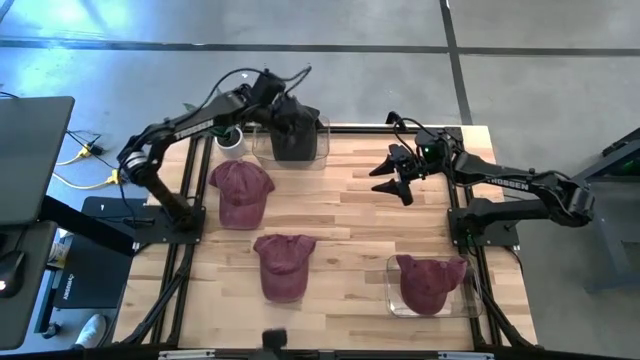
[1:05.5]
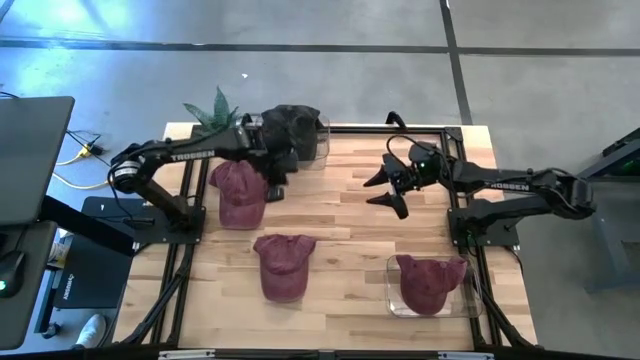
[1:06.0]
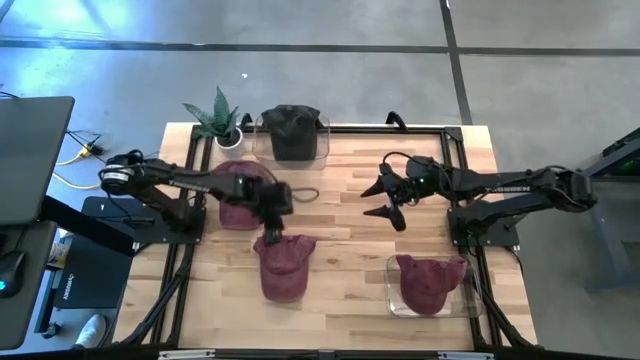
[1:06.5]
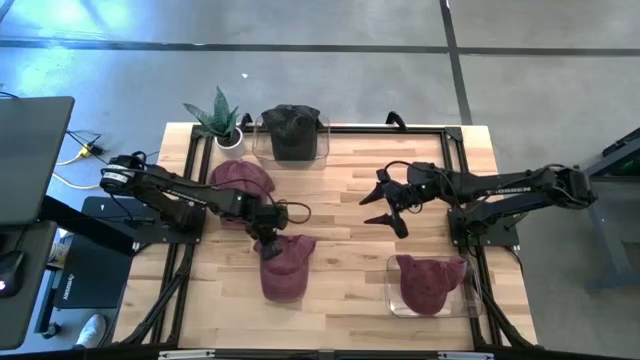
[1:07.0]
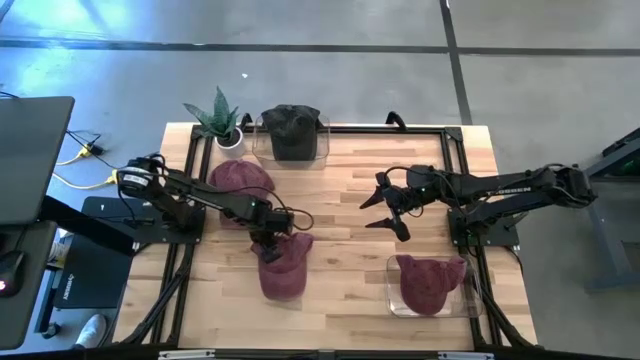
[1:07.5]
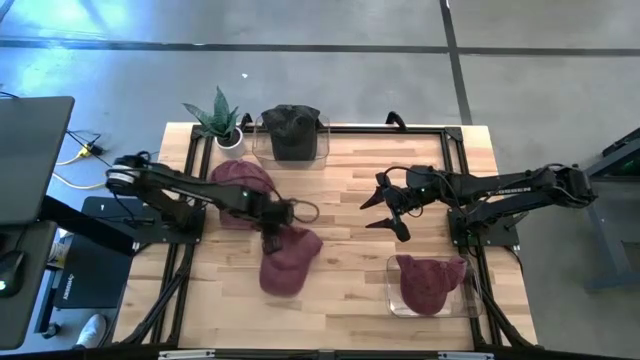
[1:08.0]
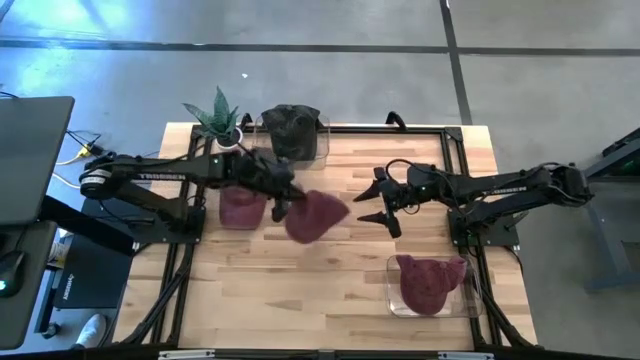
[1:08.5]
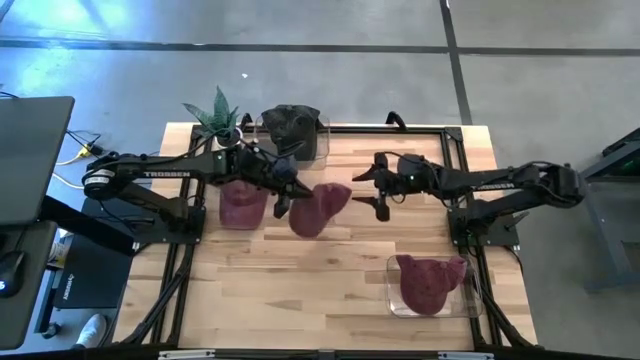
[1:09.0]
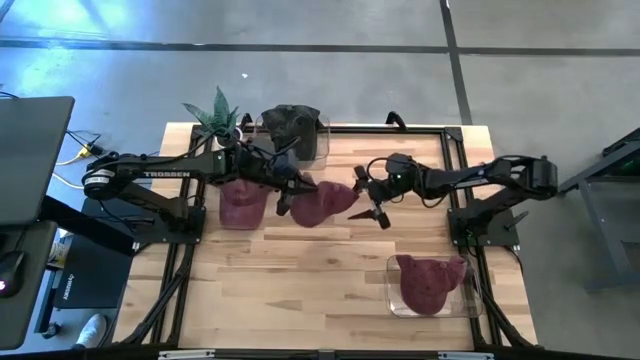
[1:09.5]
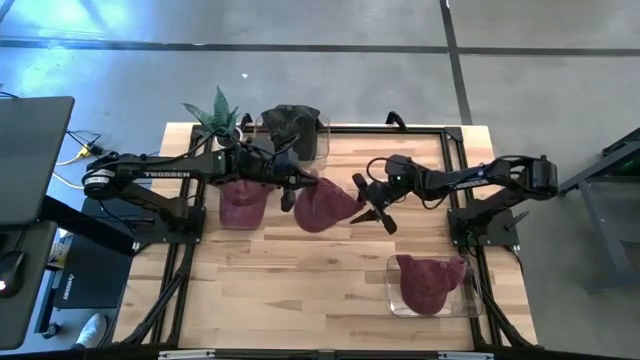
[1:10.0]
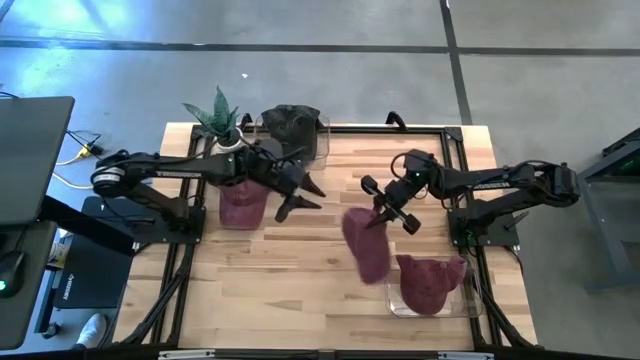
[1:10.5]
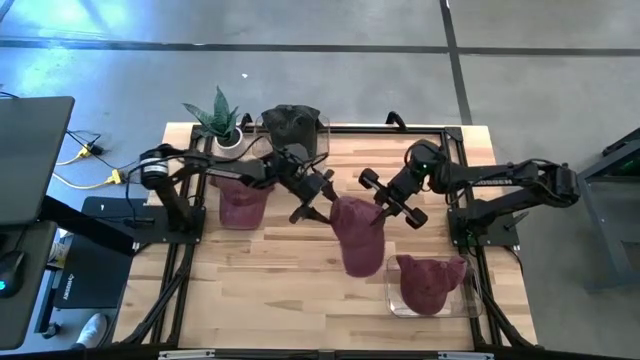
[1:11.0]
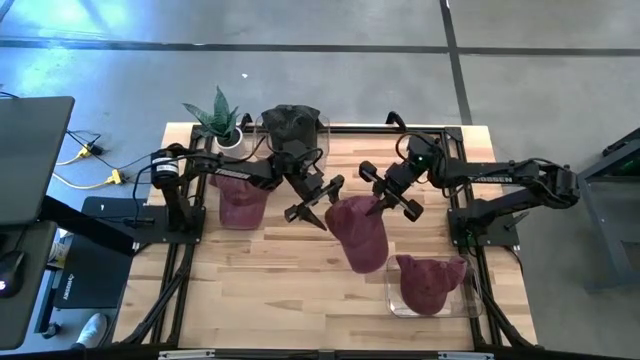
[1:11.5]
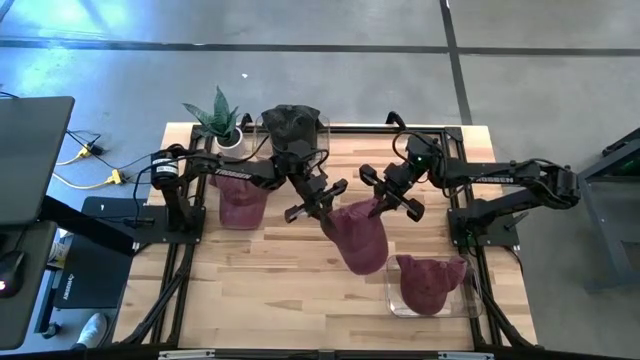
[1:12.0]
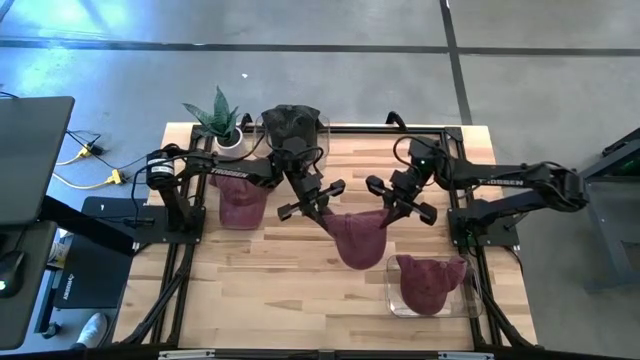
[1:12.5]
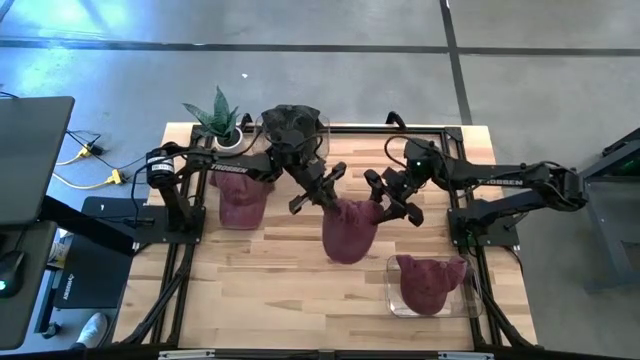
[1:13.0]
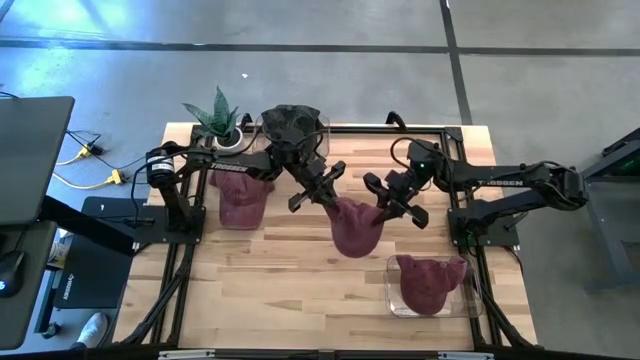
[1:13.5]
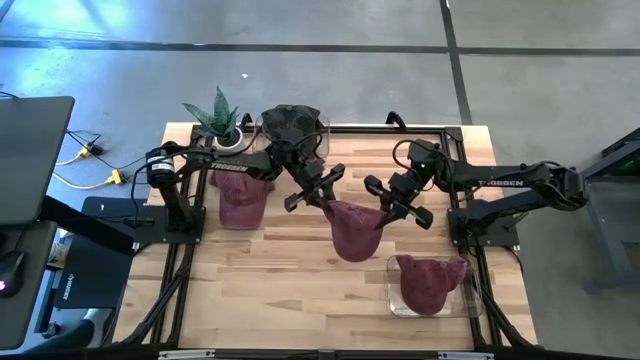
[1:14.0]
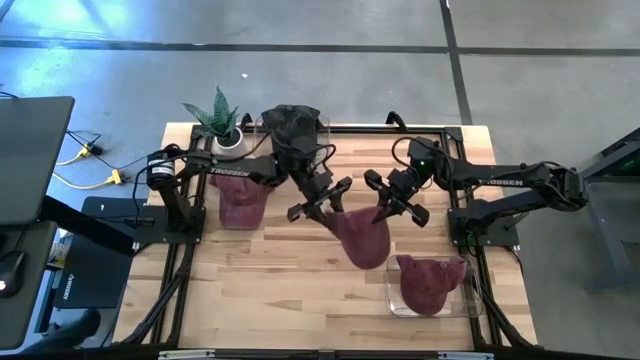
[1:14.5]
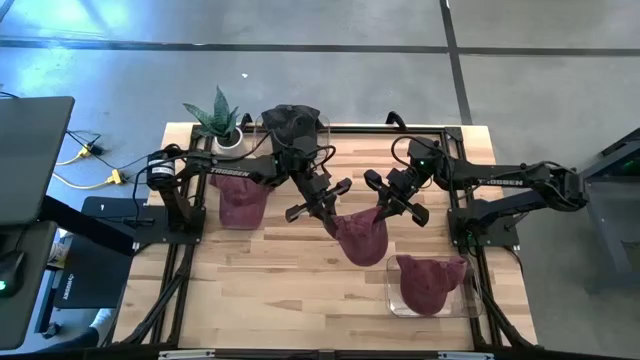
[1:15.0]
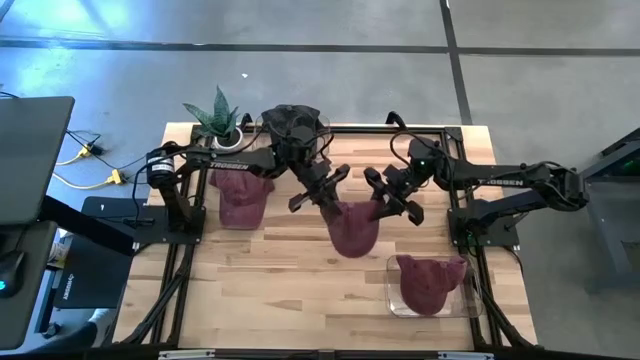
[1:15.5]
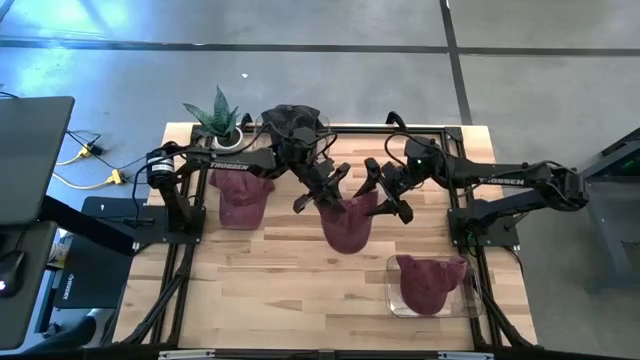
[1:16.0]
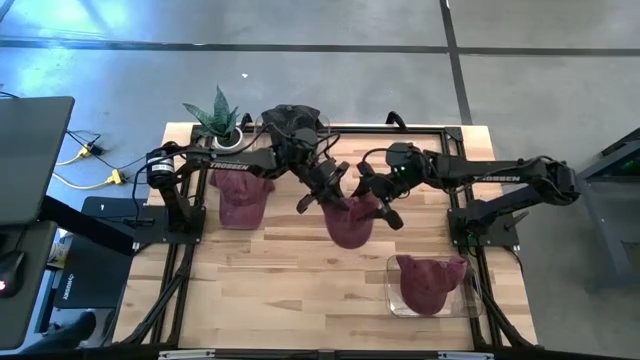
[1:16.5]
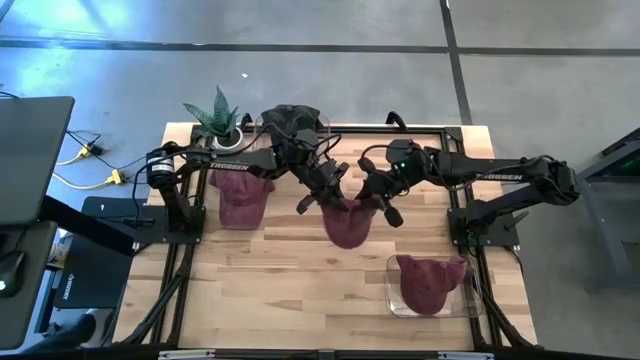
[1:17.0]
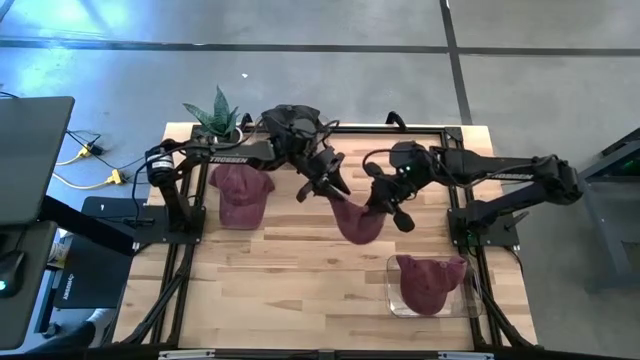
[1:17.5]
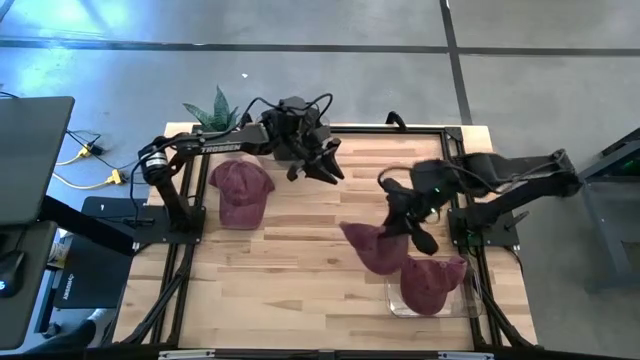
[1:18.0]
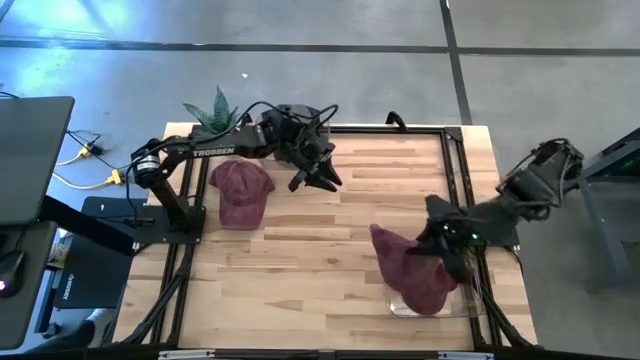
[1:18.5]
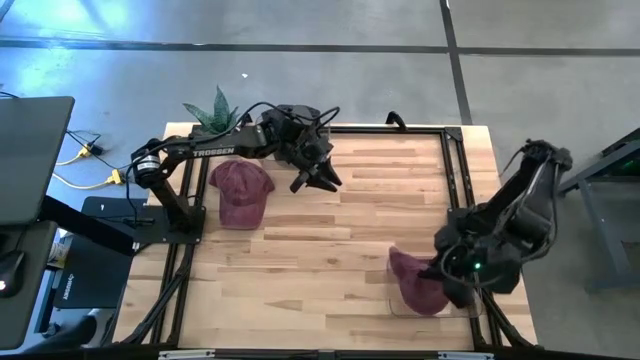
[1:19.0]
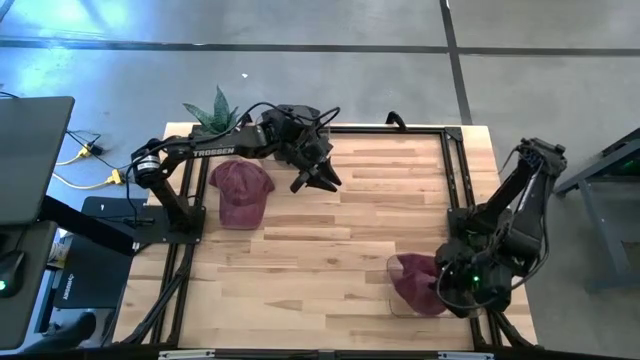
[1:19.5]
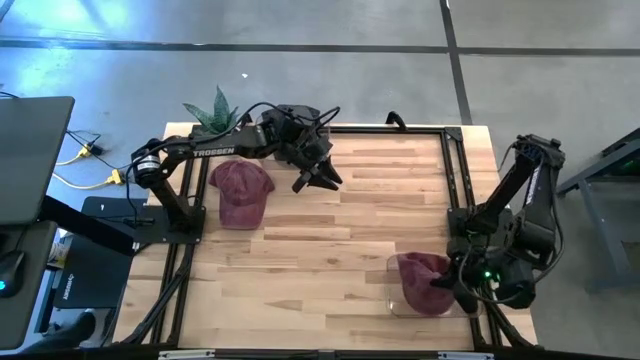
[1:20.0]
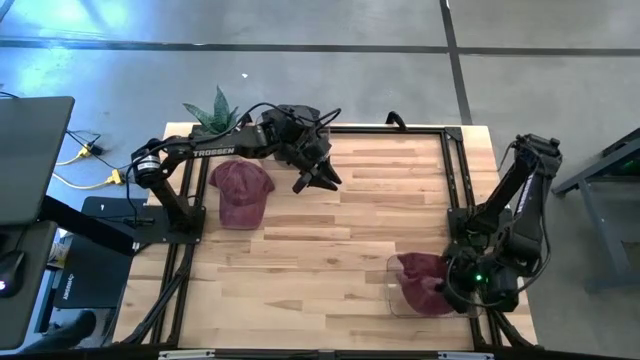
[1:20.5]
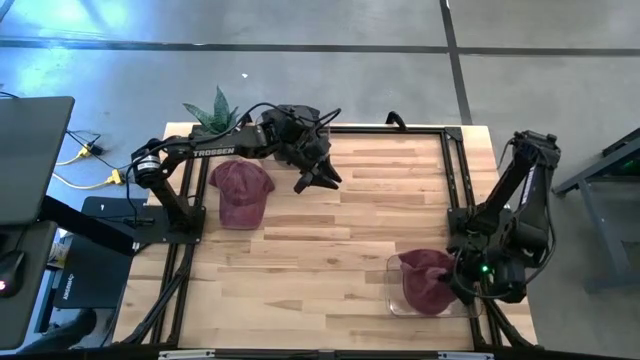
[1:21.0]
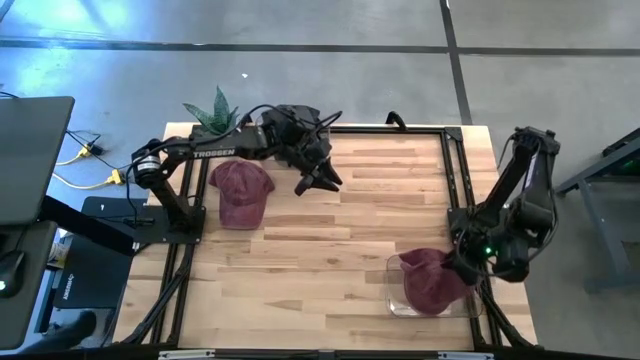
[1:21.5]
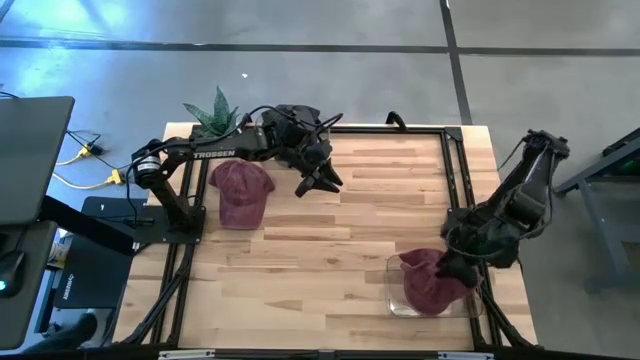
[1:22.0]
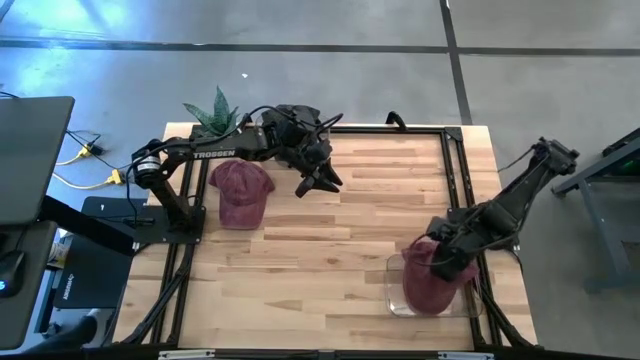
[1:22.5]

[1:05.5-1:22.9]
Task: Pick & Place hat
Put the bottom red cap into the bottom transparent bin
